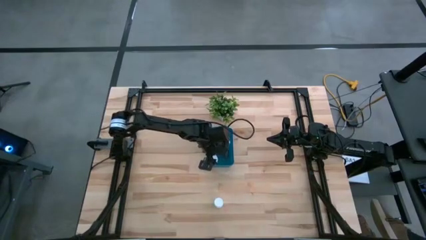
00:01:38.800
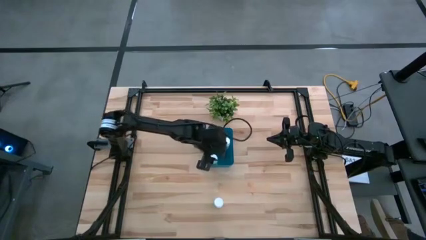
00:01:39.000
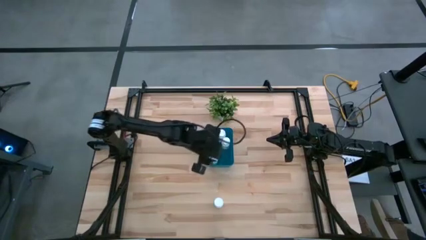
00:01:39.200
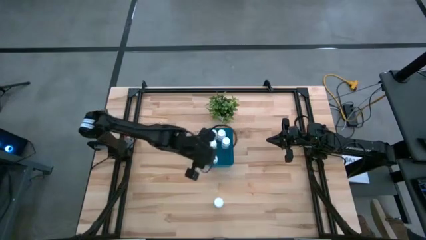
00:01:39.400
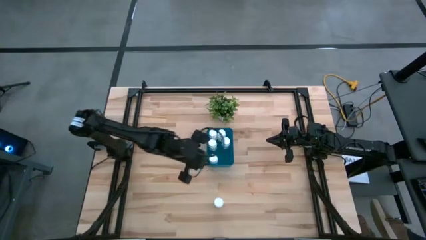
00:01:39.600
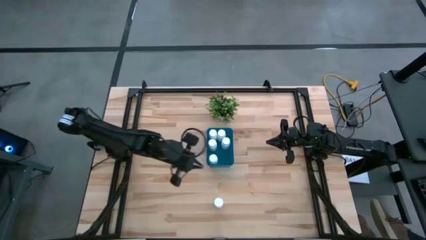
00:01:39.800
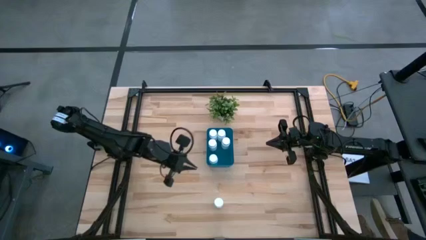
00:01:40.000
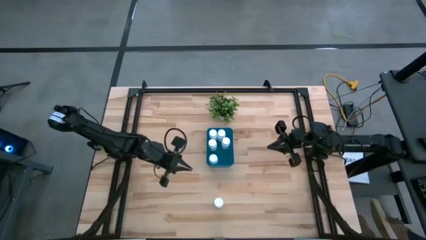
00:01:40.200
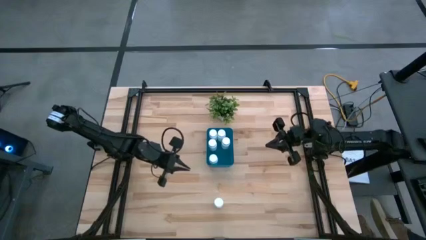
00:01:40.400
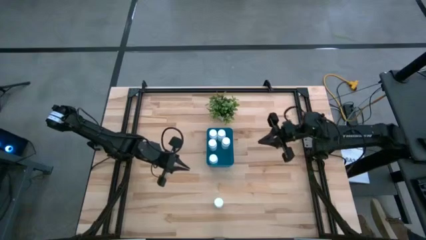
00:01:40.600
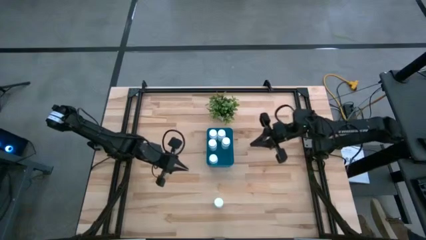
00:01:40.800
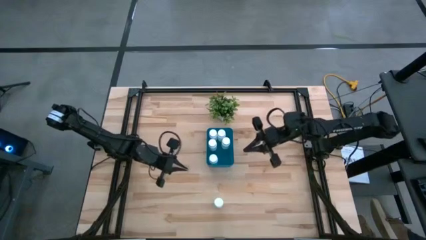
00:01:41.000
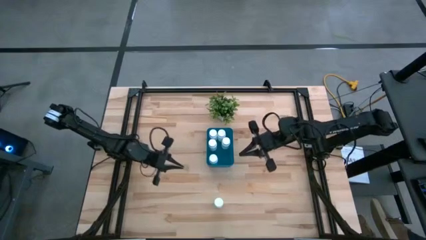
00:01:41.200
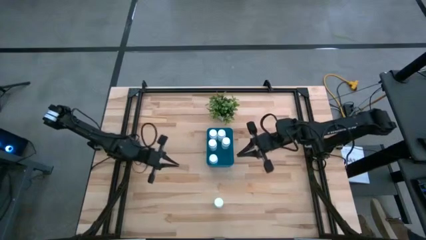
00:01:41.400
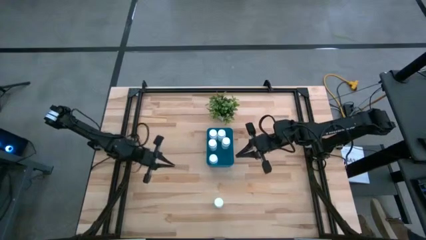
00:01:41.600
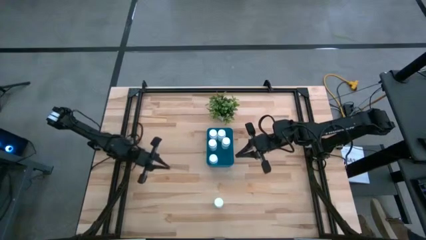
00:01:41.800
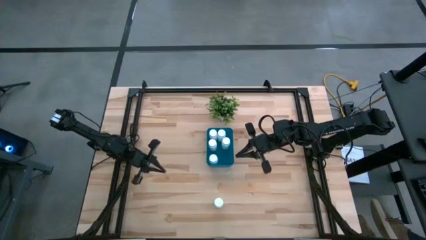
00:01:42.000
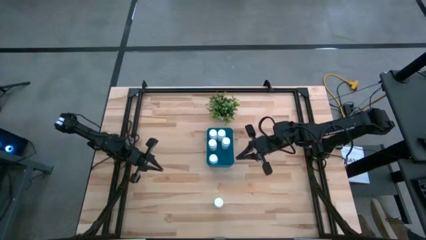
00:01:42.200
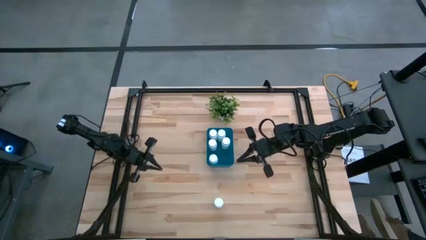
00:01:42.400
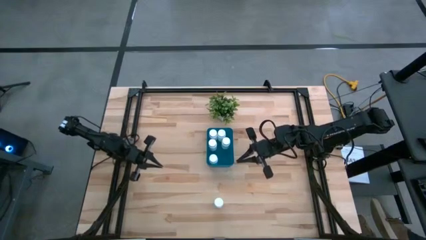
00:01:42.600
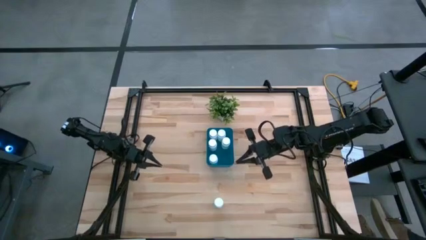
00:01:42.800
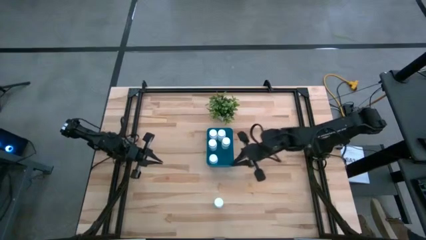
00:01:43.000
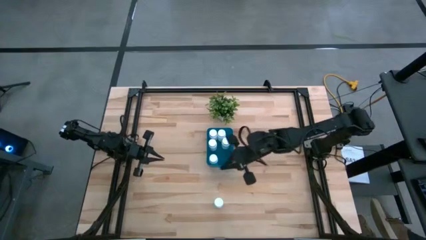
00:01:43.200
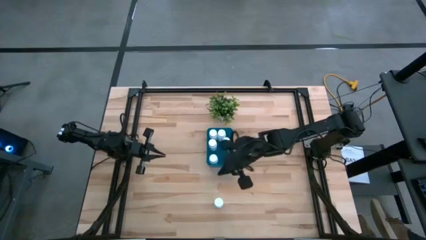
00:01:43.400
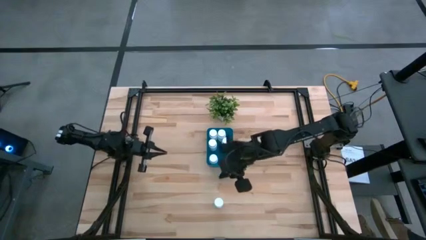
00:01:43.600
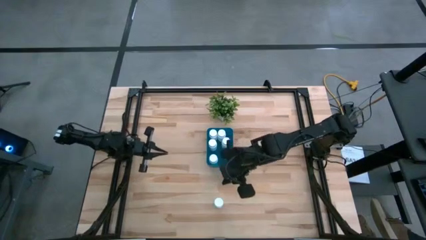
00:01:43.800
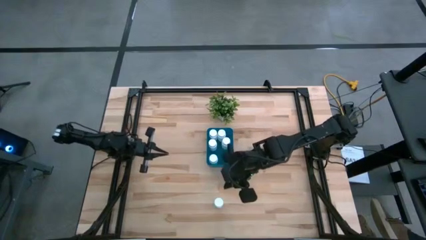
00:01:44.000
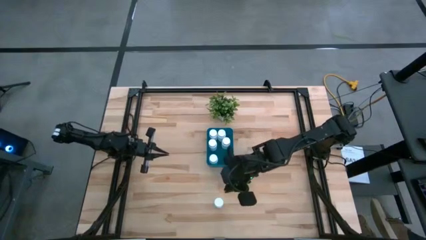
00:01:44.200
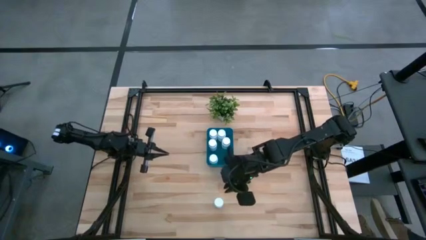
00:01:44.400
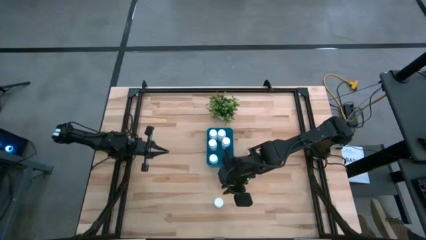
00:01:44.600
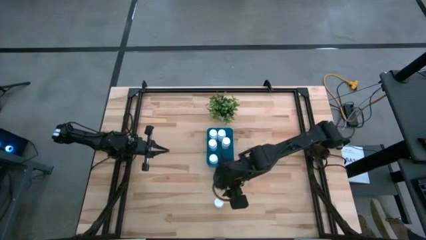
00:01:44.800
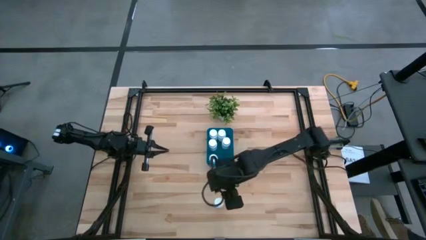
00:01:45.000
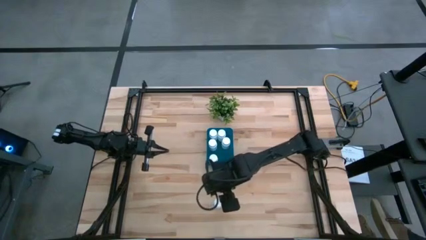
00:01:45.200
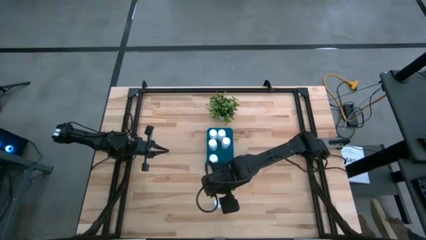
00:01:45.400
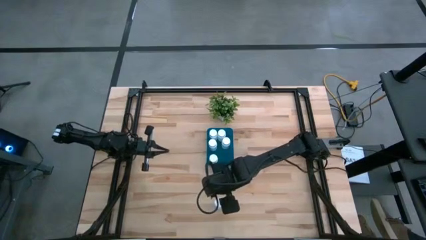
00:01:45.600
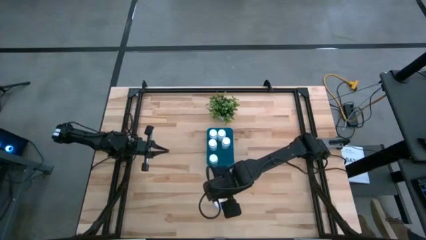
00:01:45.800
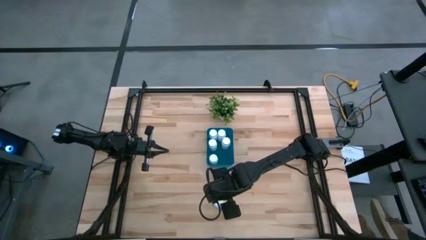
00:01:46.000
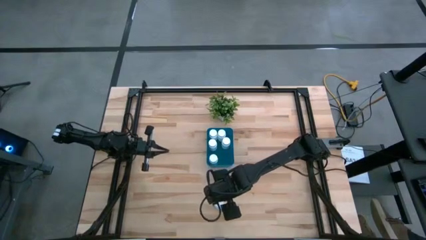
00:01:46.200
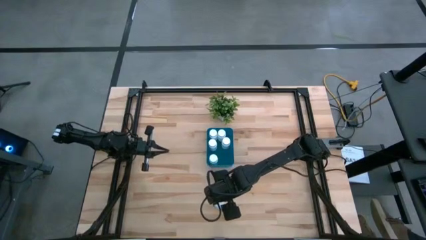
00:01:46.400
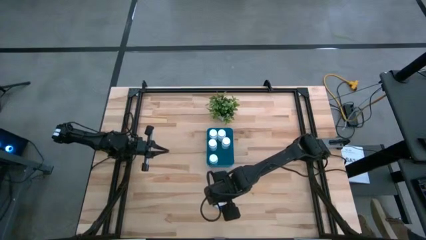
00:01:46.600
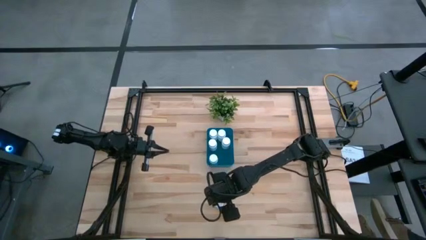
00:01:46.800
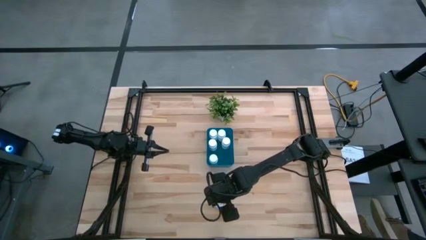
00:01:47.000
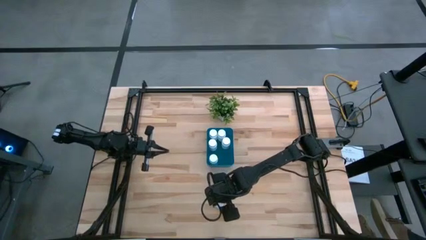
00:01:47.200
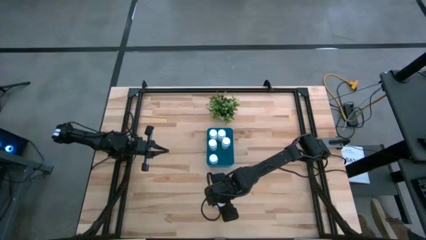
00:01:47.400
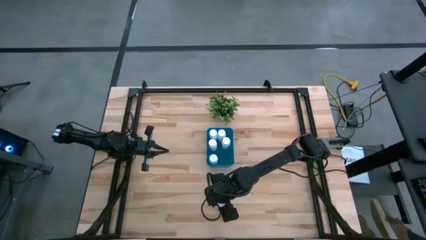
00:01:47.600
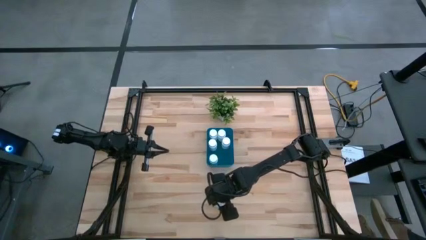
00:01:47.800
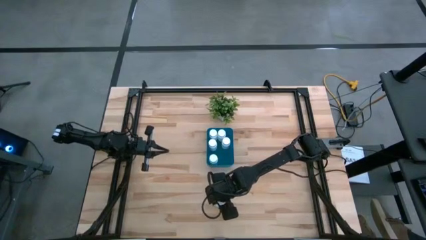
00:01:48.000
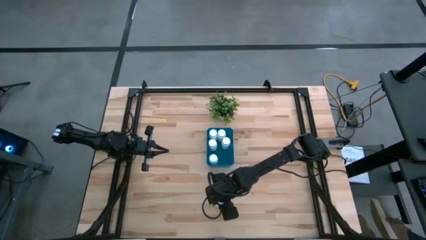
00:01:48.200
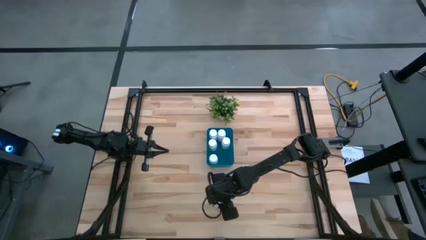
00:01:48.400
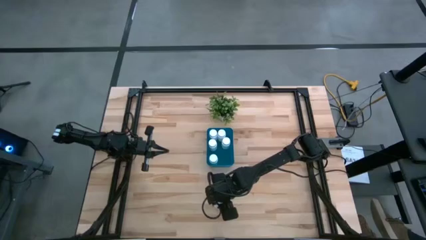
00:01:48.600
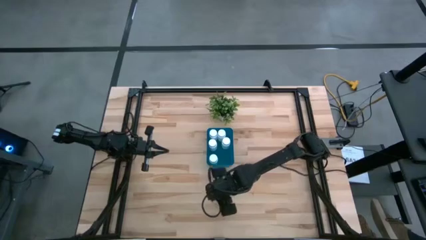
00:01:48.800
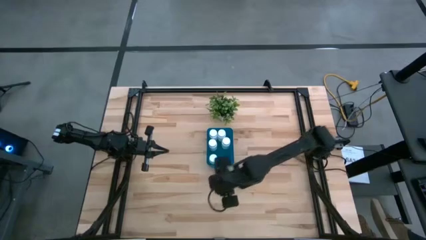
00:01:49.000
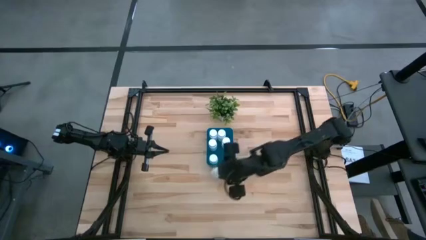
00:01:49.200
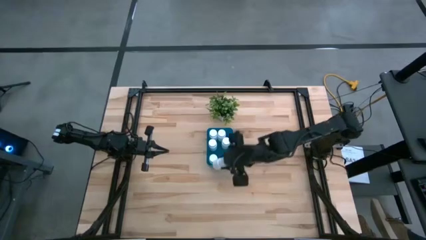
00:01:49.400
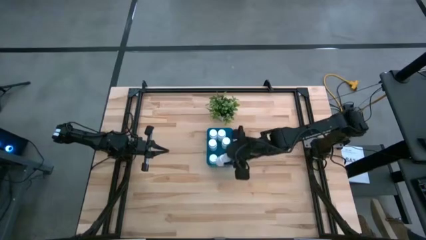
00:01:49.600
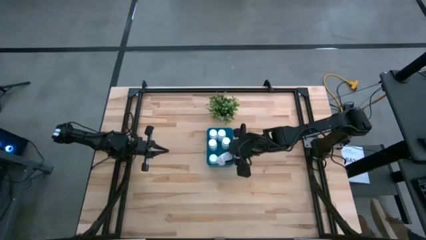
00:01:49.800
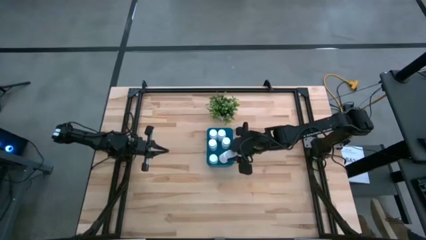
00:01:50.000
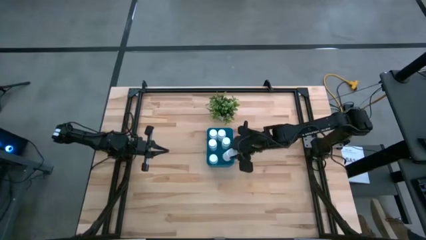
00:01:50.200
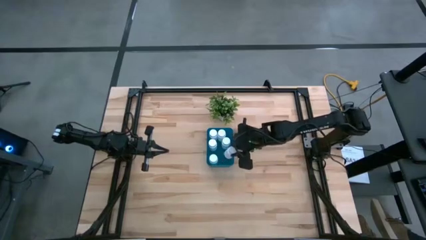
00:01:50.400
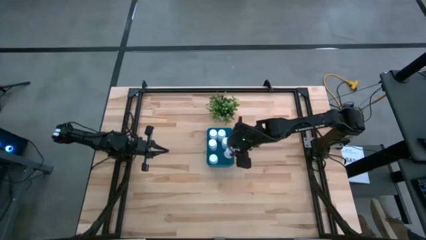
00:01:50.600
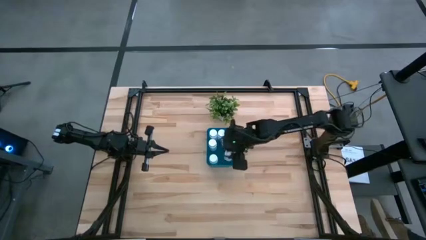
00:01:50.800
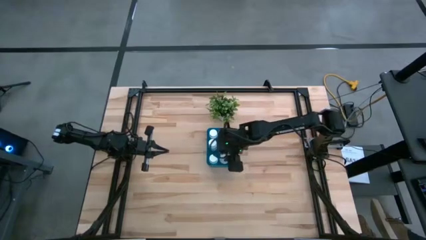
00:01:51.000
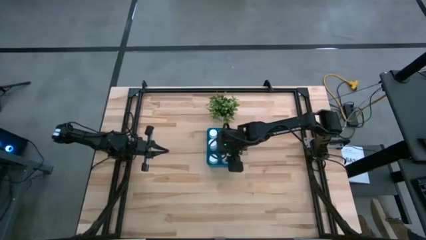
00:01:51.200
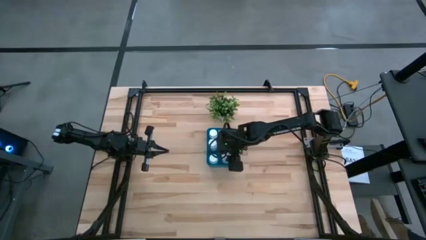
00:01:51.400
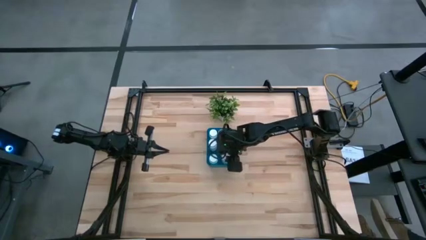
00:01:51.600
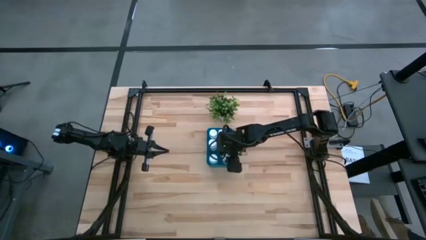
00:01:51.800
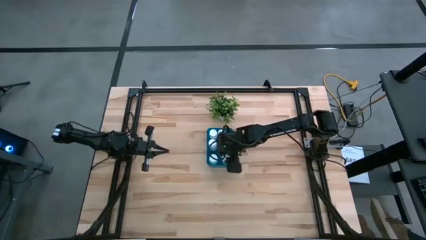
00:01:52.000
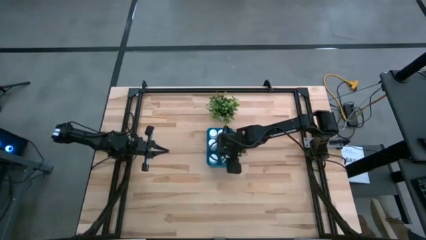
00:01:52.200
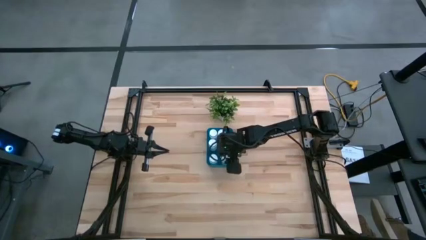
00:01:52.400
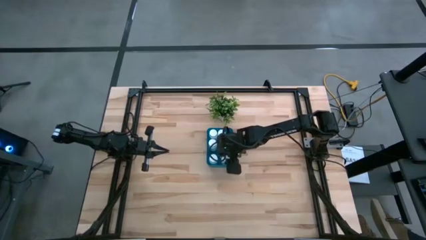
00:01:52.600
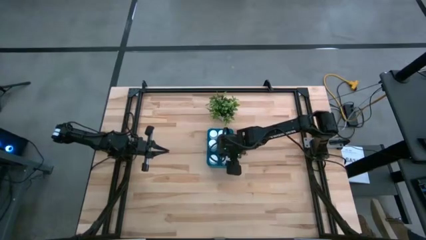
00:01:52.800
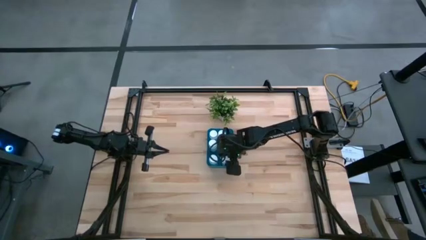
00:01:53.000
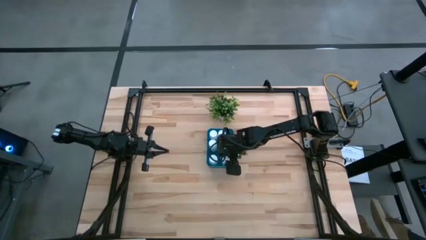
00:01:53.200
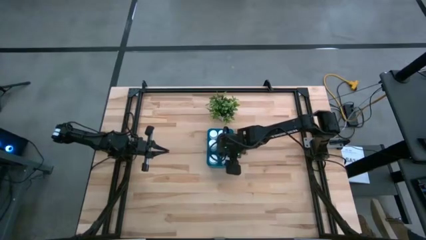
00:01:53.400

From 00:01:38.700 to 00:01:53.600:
Task: Pick and place pill bottles into a basket
Put the white pill bottle into the blue bin
